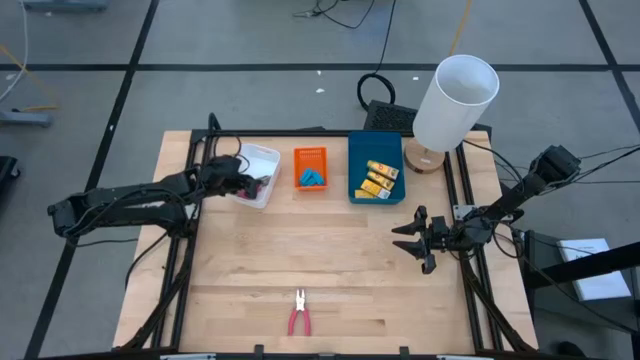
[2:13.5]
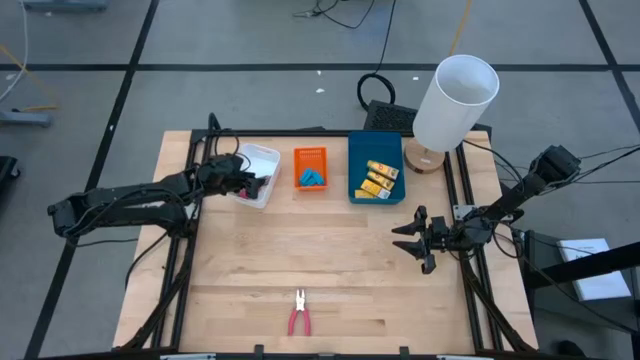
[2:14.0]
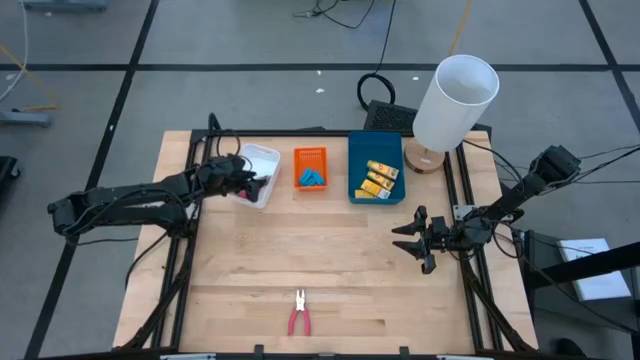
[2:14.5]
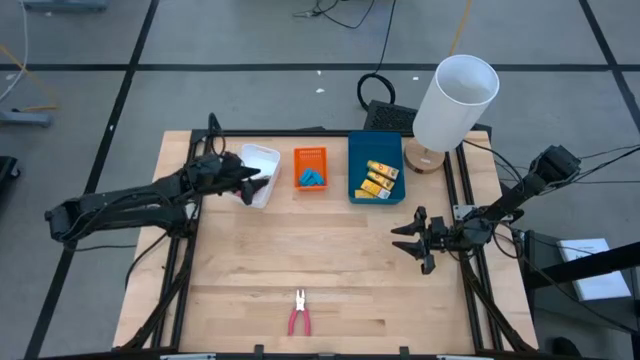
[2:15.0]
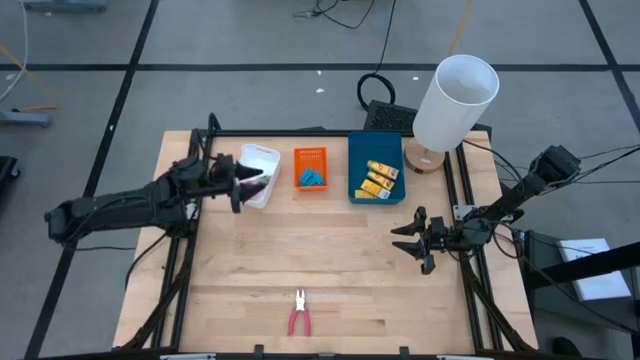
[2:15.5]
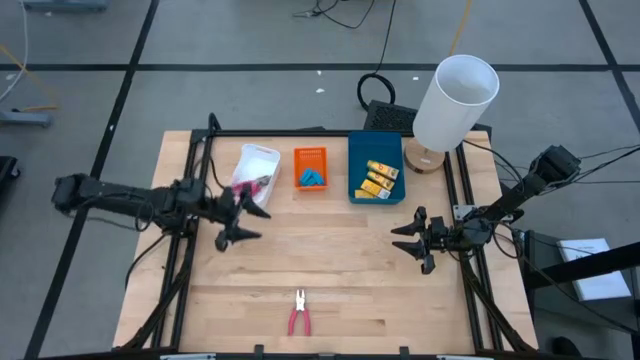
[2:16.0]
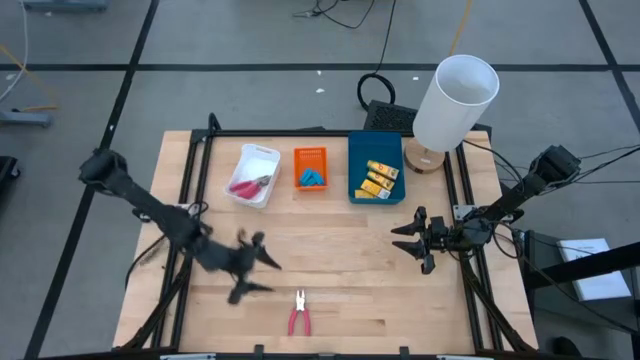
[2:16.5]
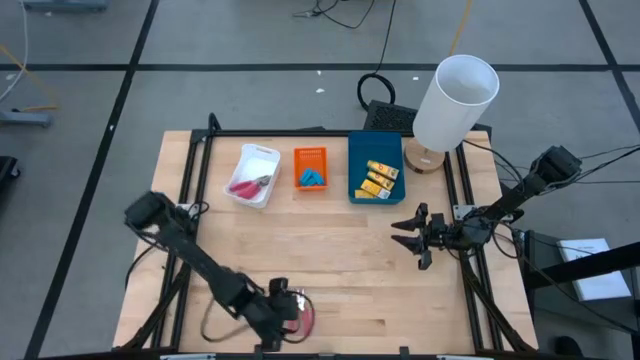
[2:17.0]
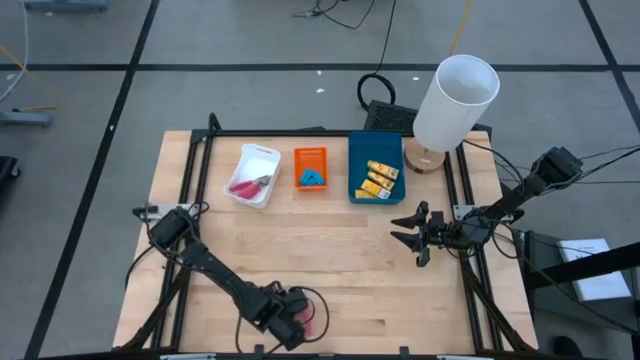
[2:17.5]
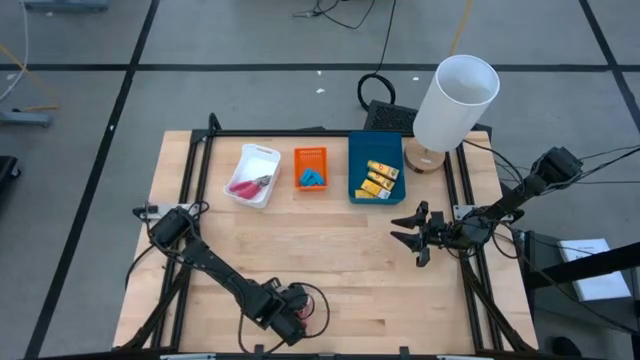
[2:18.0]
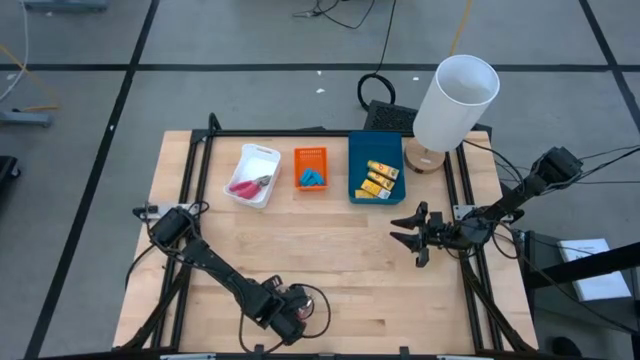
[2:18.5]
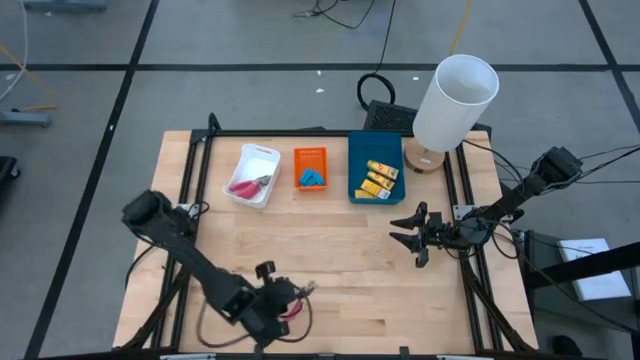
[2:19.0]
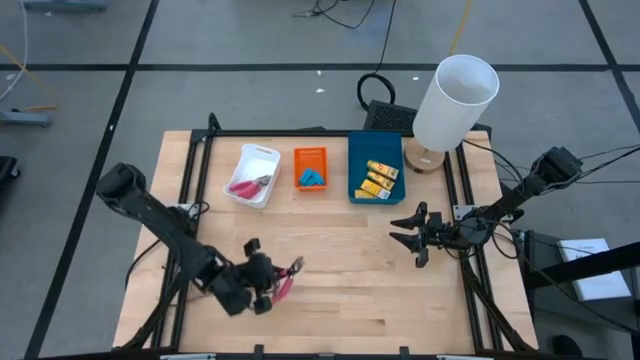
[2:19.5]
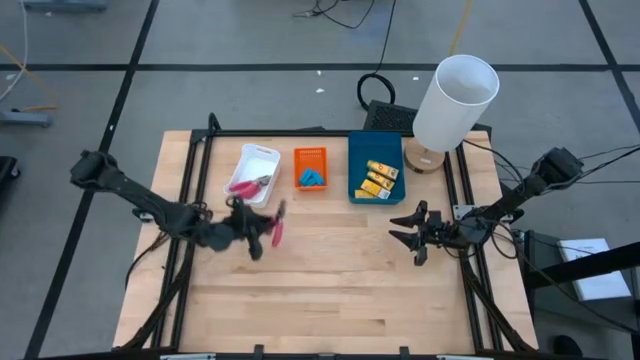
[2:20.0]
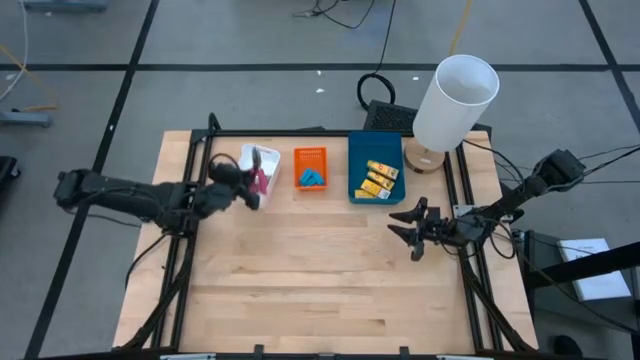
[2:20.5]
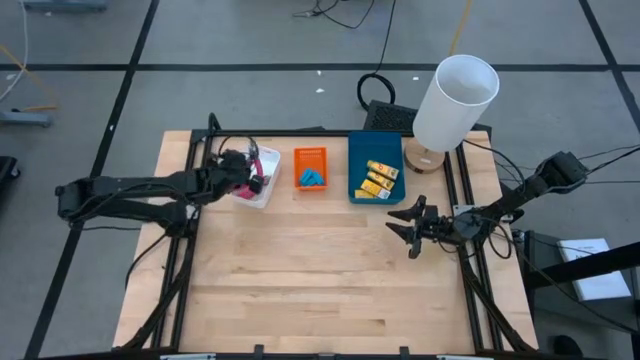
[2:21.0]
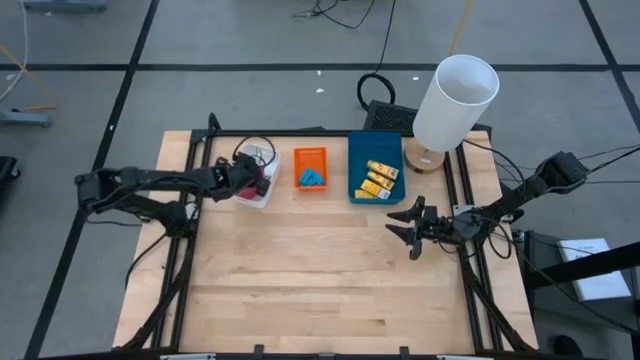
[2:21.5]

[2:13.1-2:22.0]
Task: Pick & Place School Supplies
Put the ticket punch into the white bin

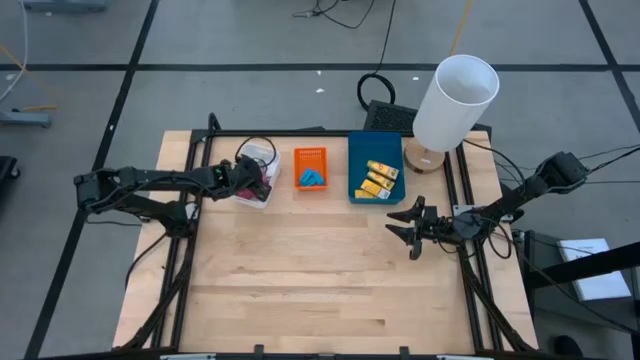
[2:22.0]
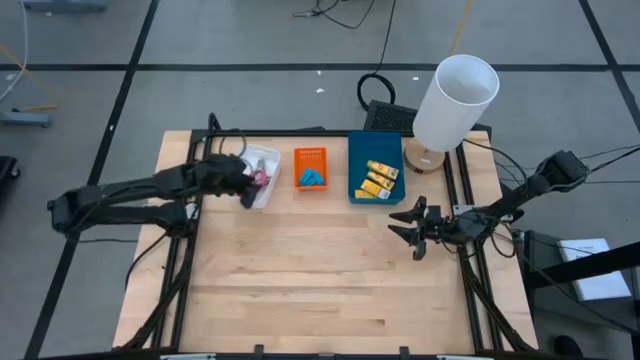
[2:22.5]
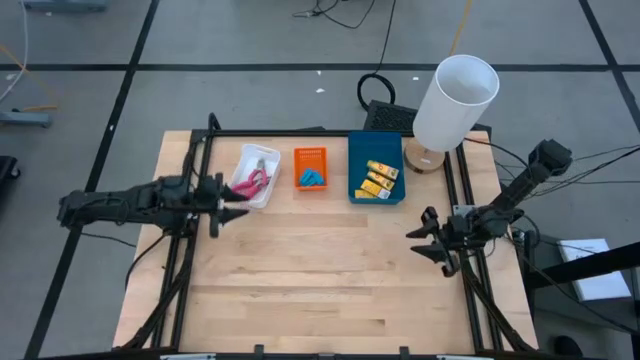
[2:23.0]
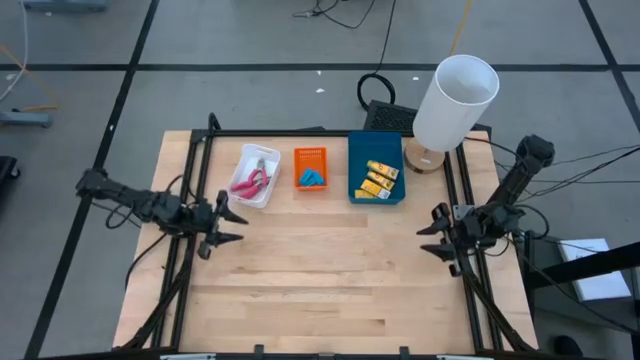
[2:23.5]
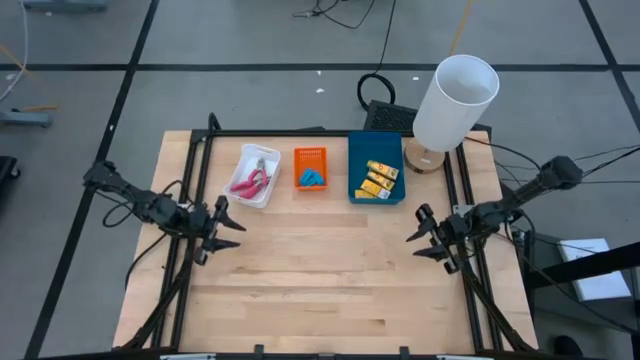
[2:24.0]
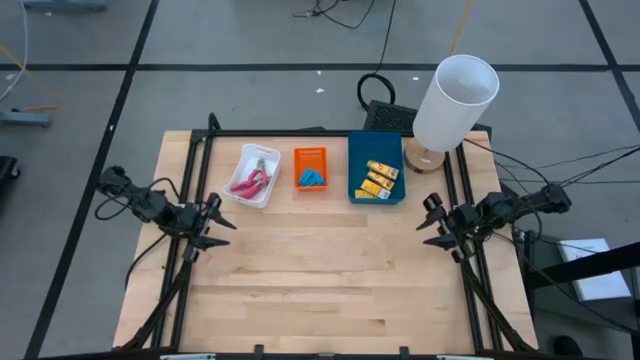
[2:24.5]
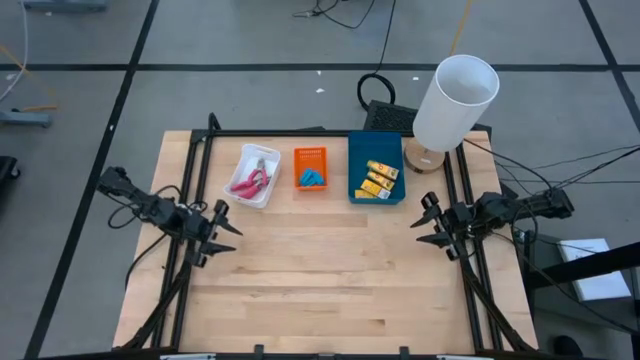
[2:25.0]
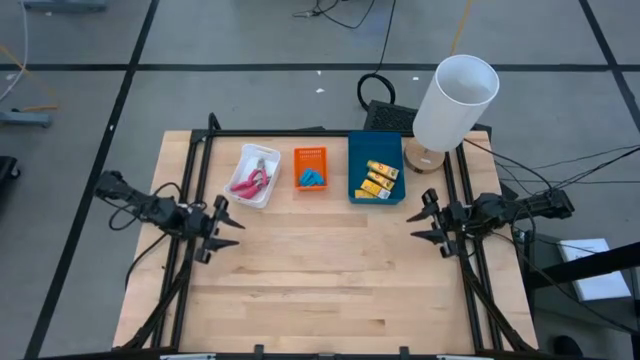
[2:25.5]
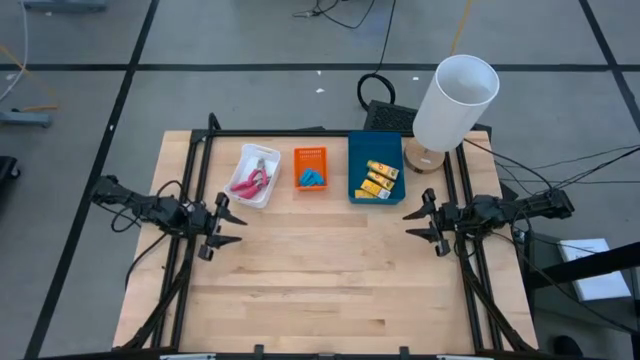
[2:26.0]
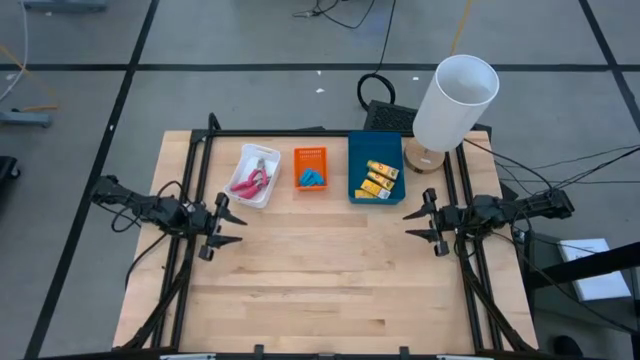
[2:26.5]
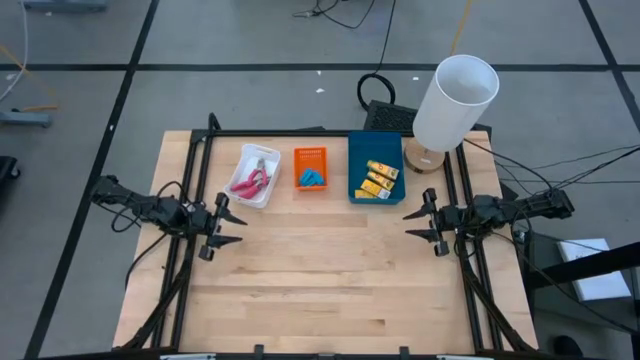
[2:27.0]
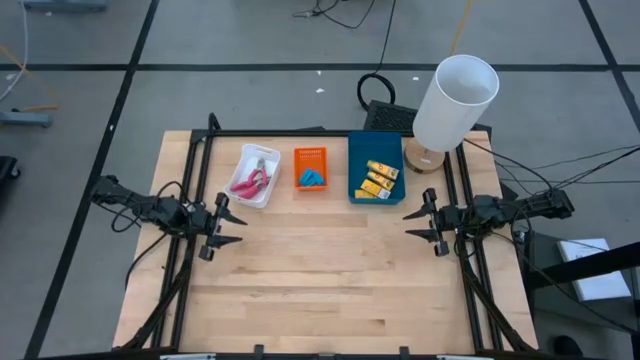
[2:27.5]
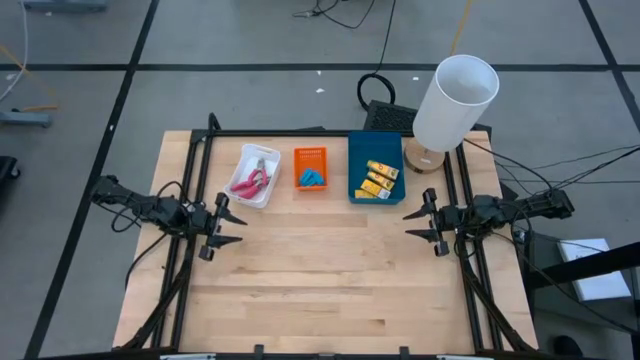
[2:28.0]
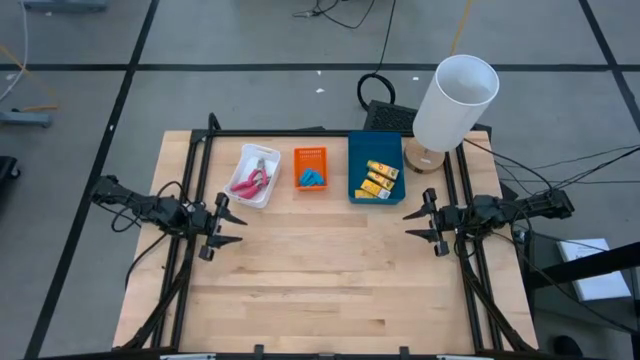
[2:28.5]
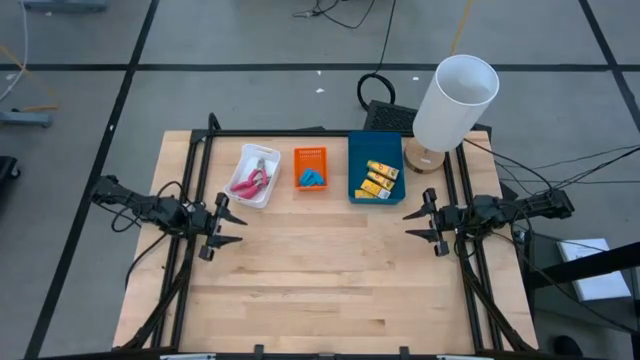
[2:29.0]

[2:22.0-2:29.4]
Return to Home Position

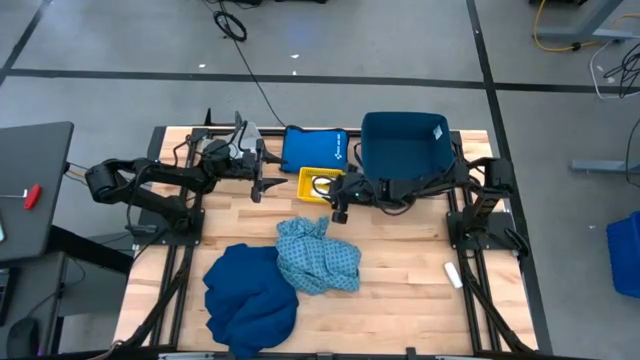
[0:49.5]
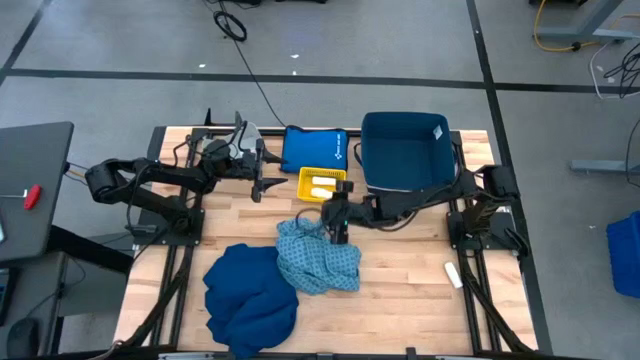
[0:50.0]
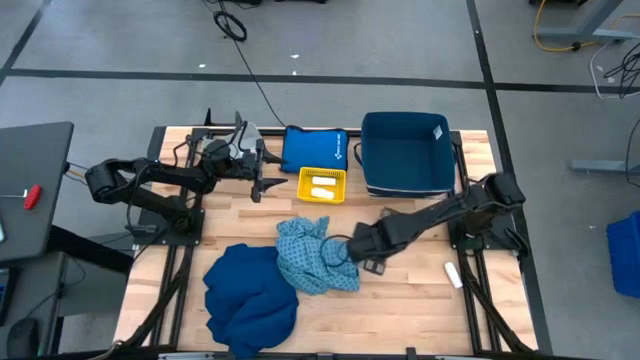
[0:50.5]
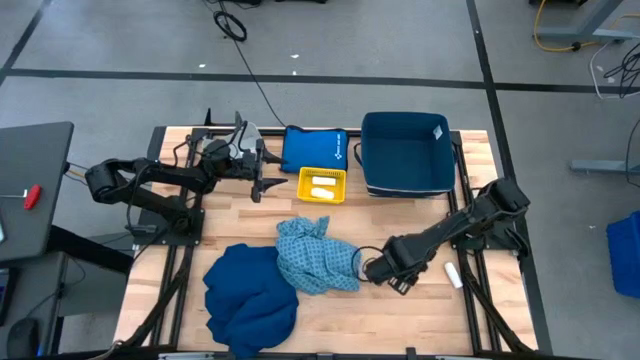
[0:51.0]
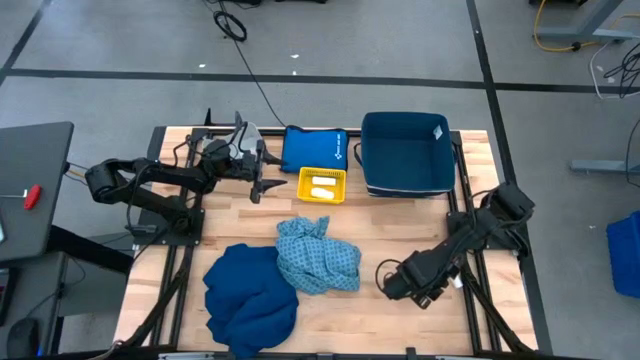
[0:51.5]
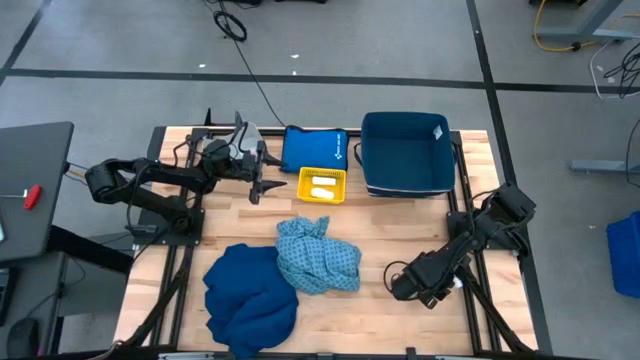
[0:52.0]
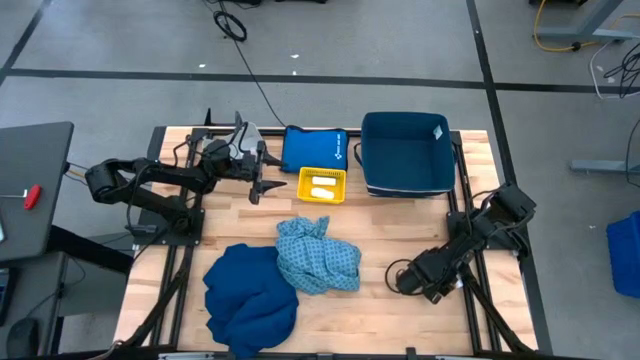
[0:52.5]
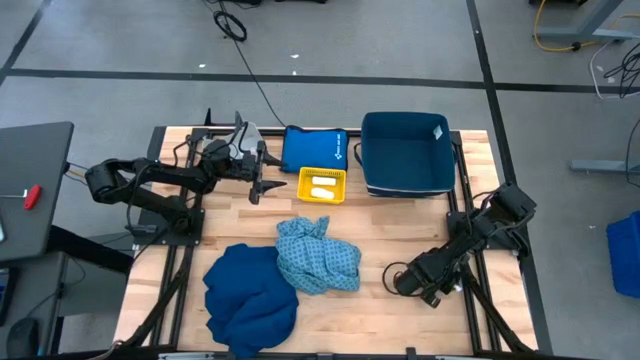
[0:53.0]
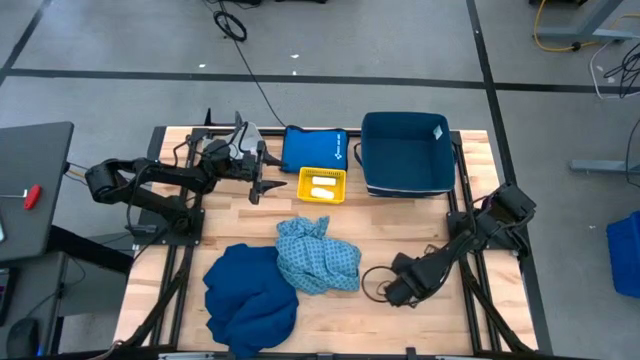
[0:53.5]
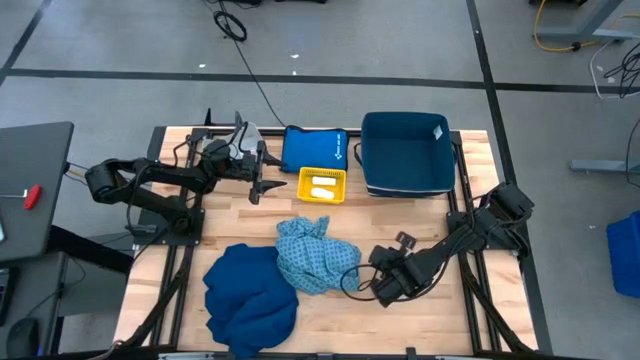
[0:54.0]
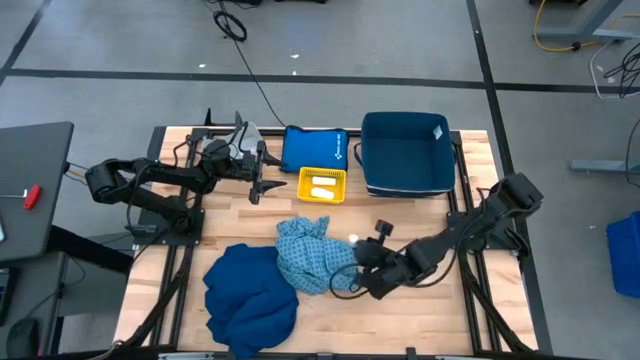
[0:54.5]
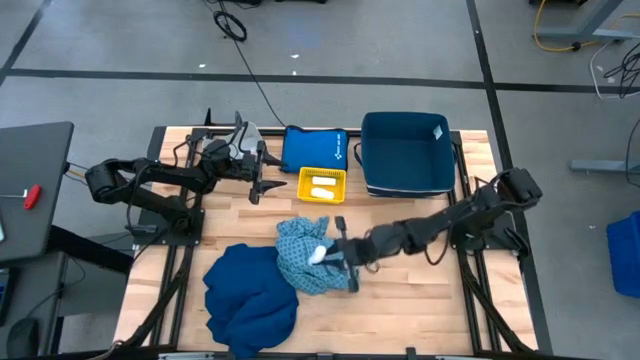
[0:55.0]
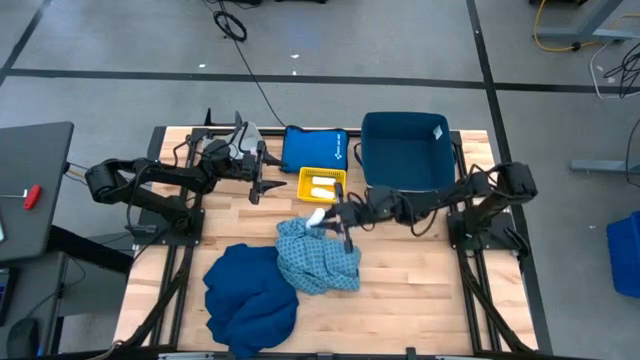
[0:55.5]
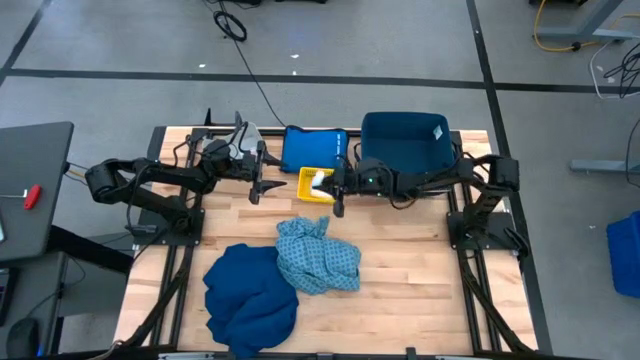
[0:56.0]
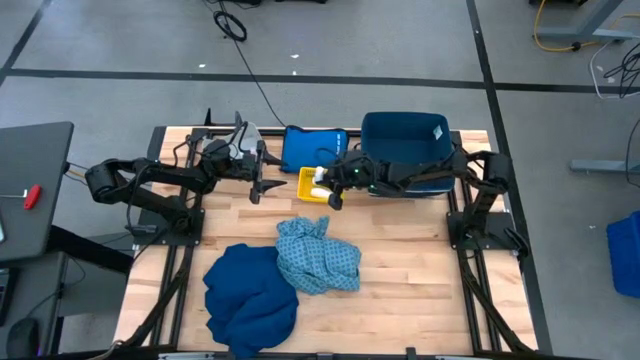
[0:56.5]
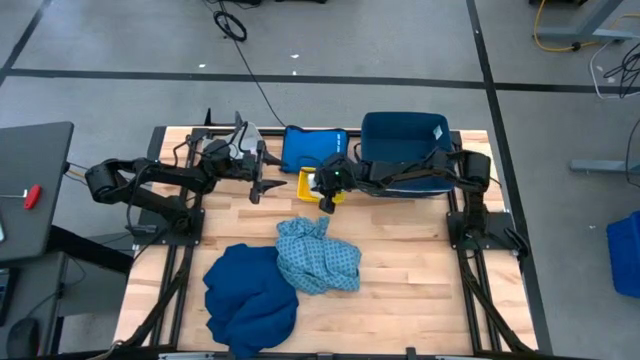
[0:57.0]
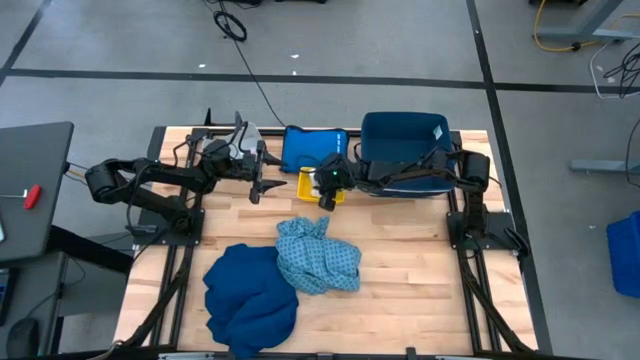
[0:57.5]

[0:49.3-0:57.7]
Task: Pick & place medical supplies in basket/bin
Put the white rolled gauze into the yellow bin
